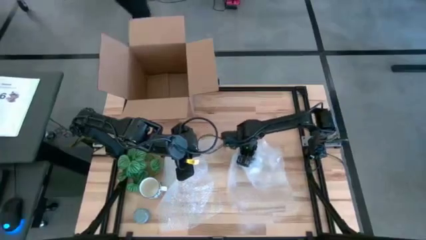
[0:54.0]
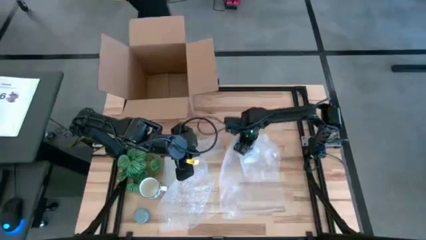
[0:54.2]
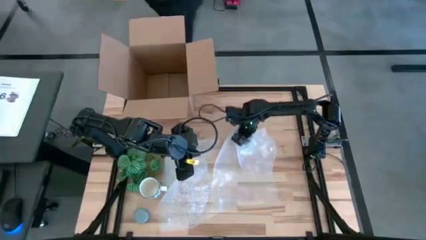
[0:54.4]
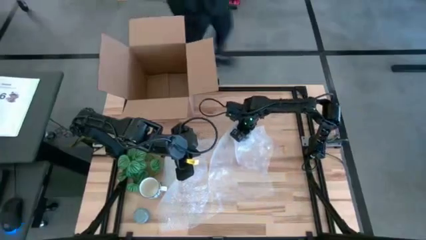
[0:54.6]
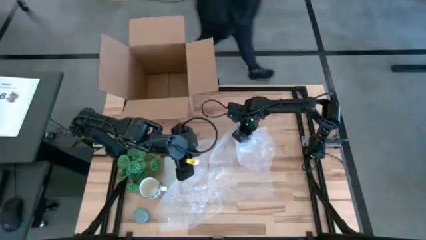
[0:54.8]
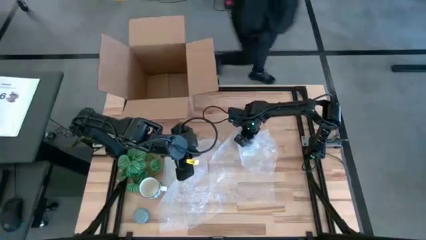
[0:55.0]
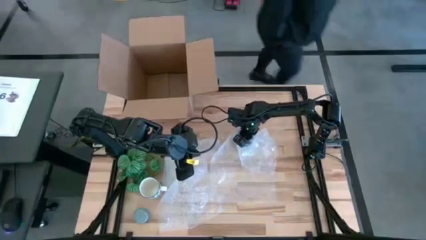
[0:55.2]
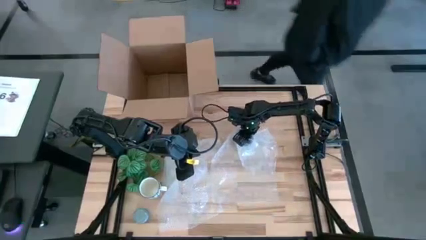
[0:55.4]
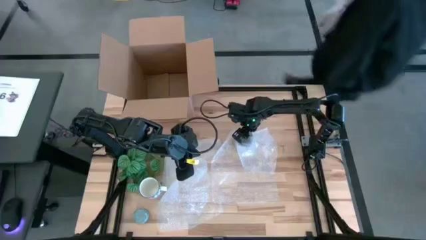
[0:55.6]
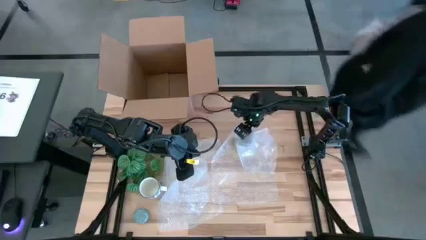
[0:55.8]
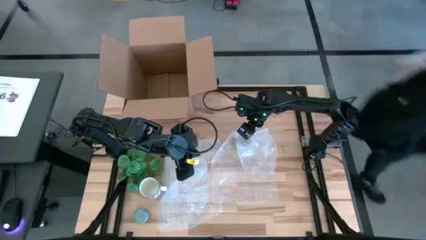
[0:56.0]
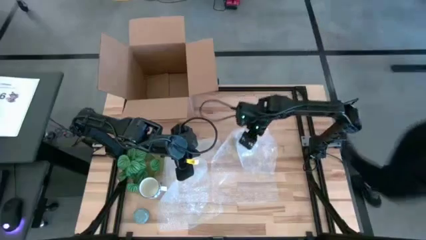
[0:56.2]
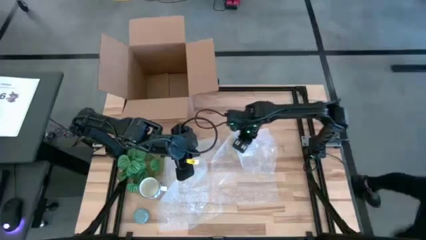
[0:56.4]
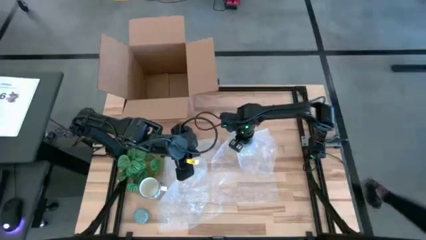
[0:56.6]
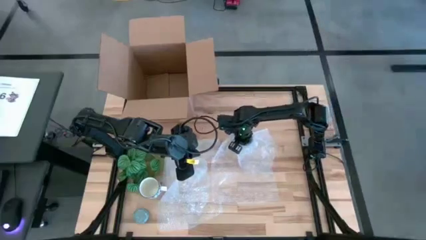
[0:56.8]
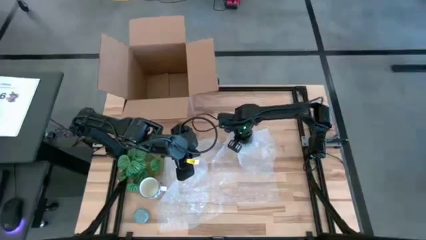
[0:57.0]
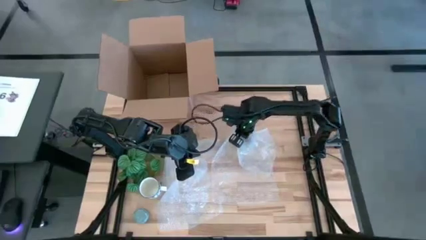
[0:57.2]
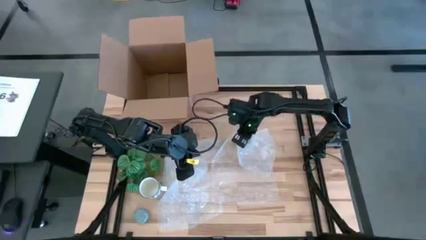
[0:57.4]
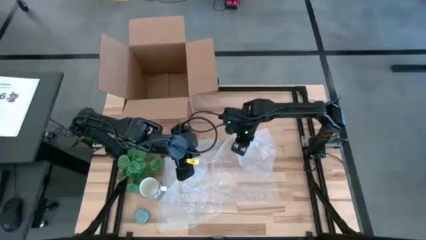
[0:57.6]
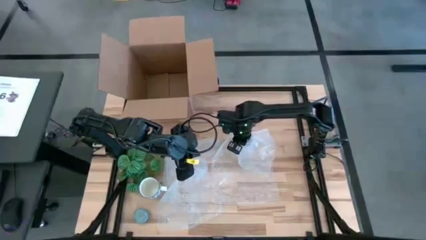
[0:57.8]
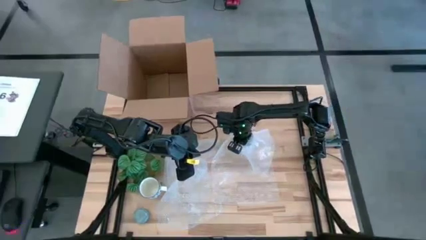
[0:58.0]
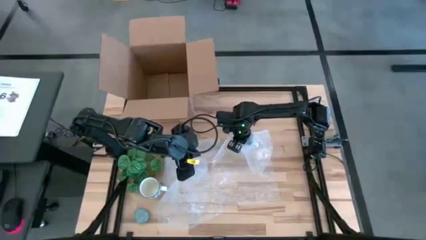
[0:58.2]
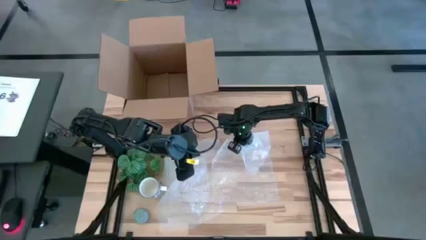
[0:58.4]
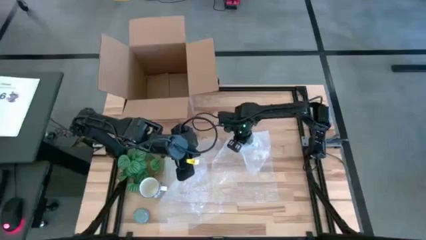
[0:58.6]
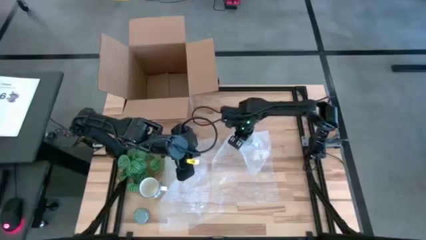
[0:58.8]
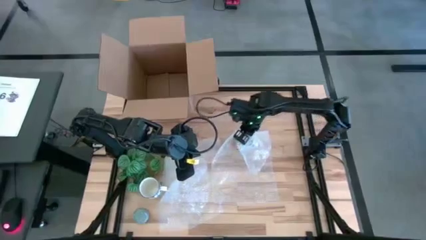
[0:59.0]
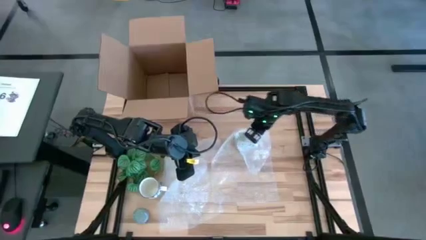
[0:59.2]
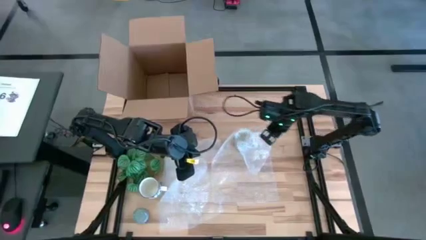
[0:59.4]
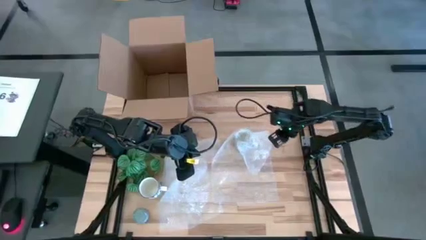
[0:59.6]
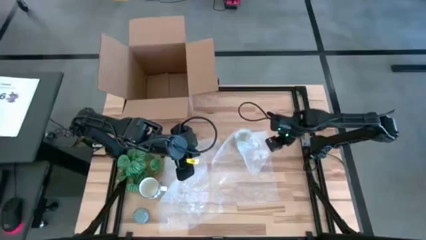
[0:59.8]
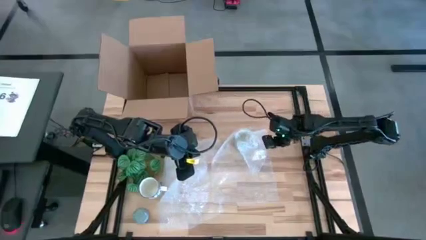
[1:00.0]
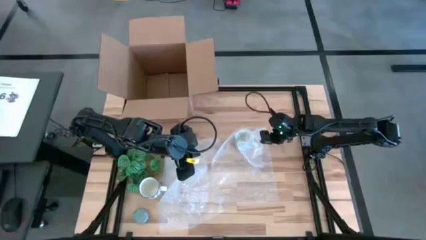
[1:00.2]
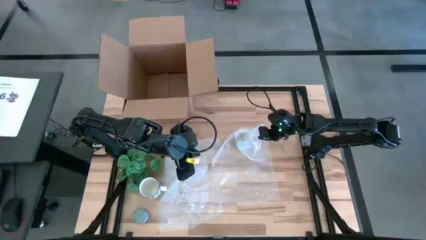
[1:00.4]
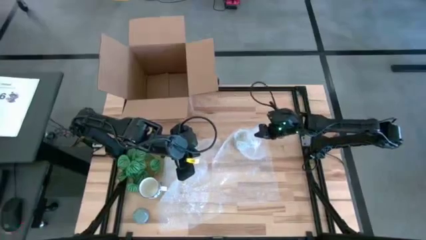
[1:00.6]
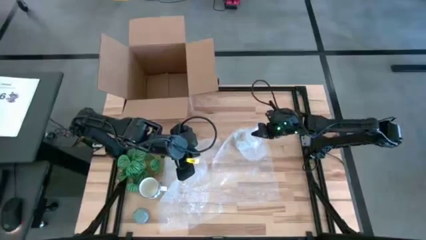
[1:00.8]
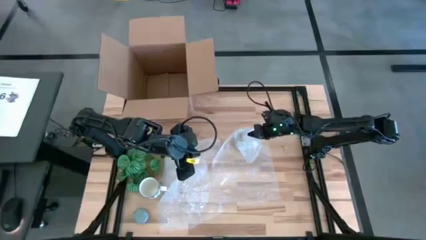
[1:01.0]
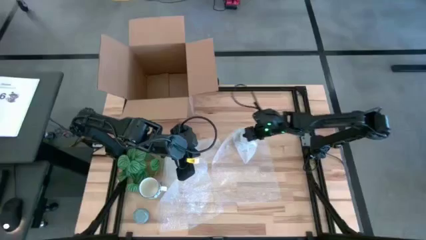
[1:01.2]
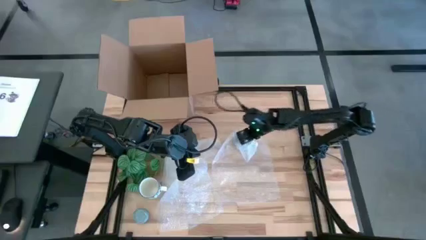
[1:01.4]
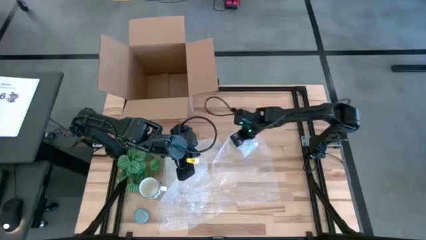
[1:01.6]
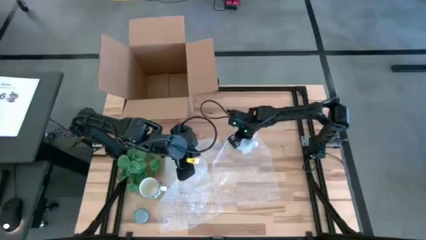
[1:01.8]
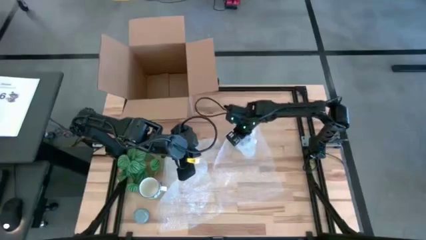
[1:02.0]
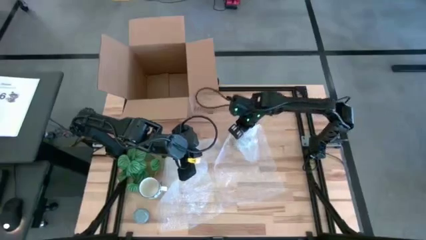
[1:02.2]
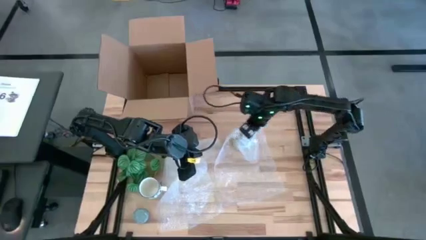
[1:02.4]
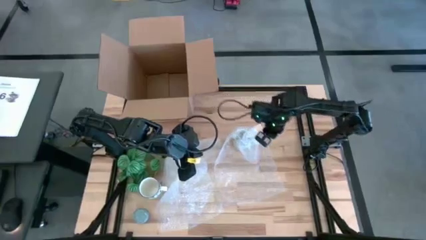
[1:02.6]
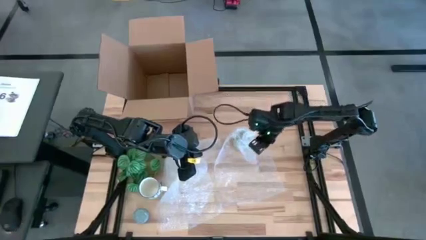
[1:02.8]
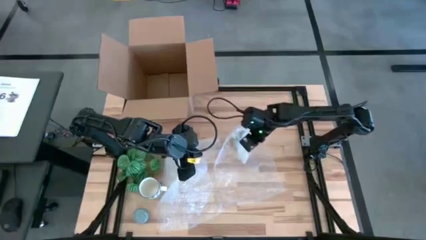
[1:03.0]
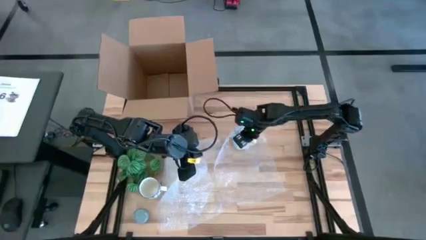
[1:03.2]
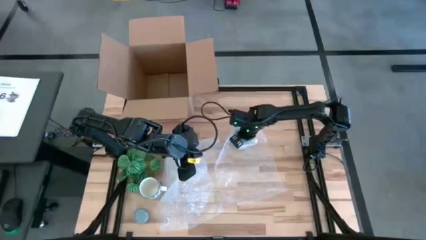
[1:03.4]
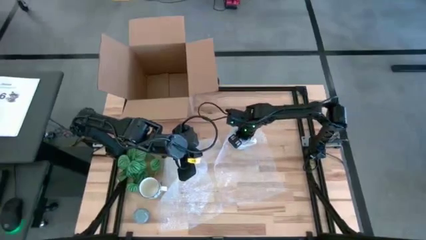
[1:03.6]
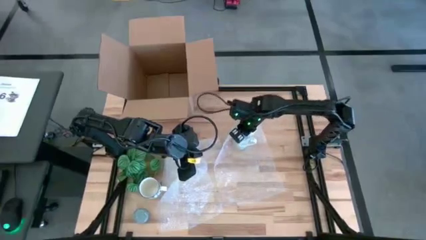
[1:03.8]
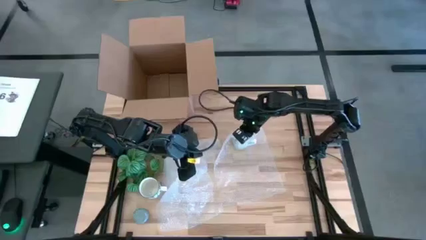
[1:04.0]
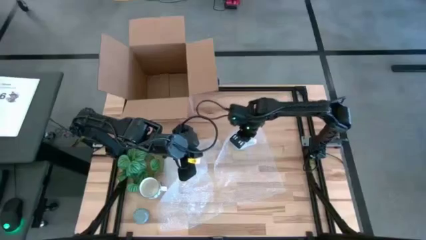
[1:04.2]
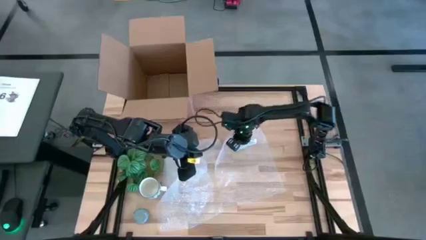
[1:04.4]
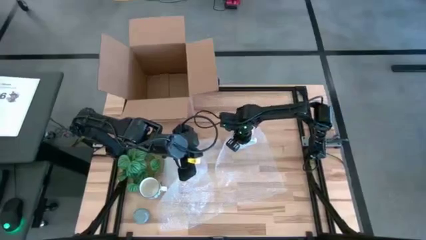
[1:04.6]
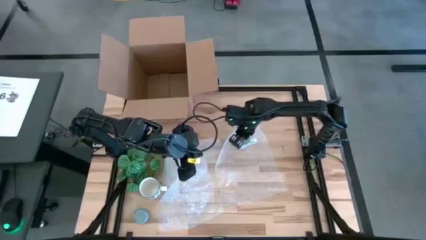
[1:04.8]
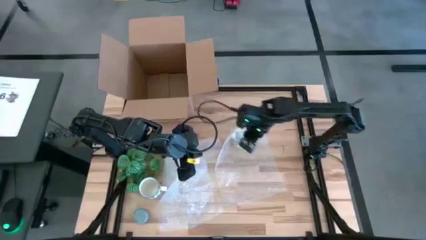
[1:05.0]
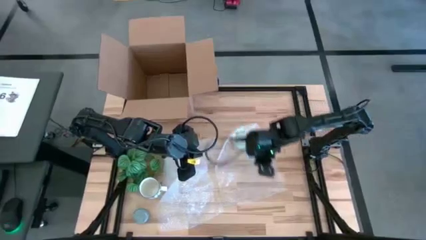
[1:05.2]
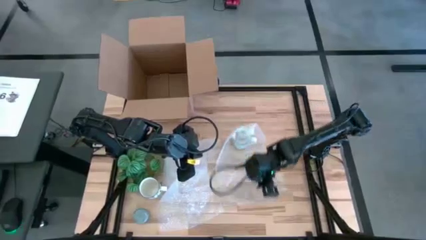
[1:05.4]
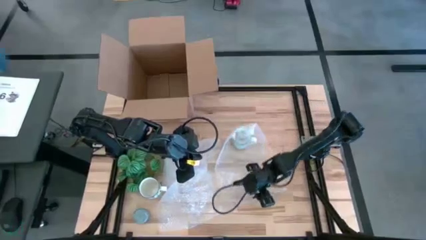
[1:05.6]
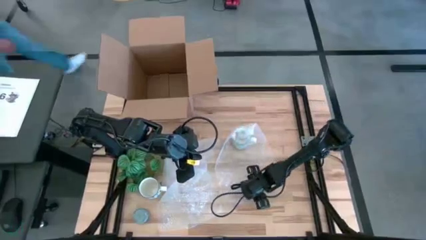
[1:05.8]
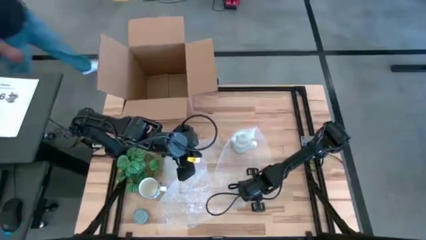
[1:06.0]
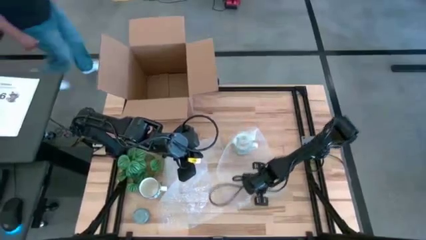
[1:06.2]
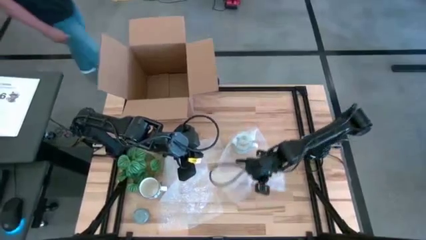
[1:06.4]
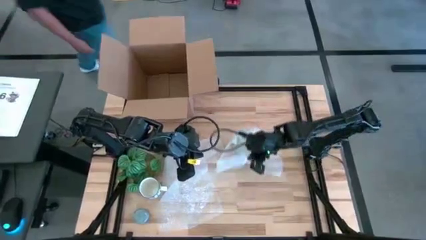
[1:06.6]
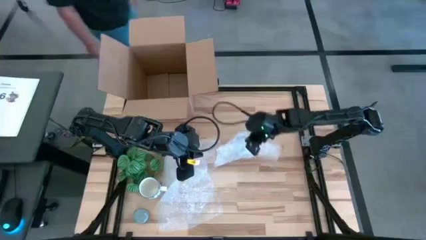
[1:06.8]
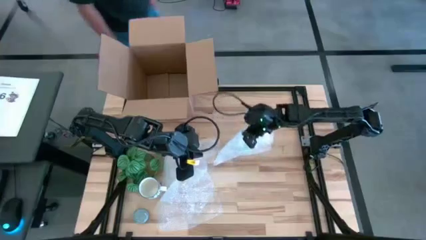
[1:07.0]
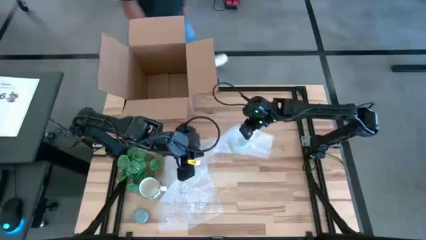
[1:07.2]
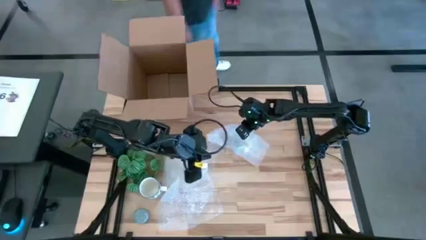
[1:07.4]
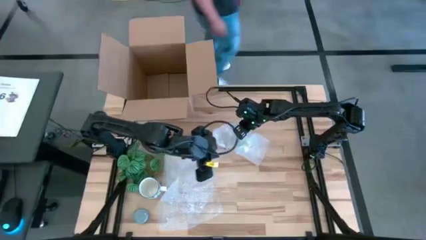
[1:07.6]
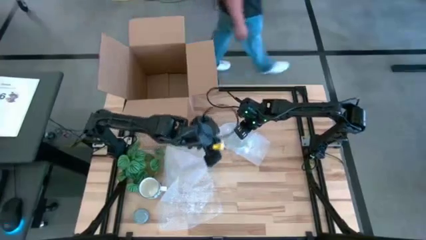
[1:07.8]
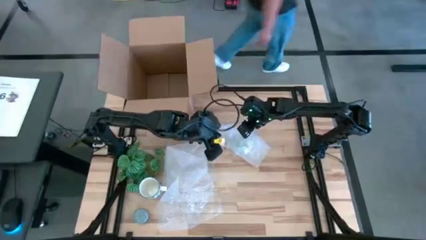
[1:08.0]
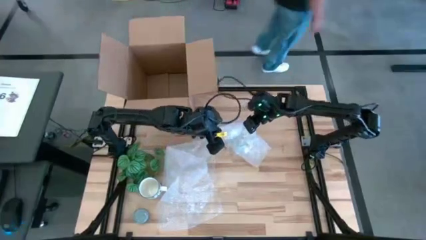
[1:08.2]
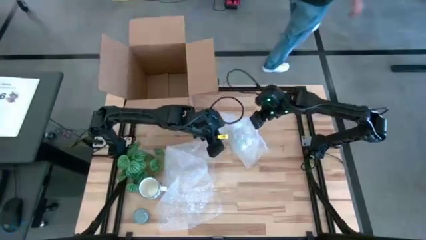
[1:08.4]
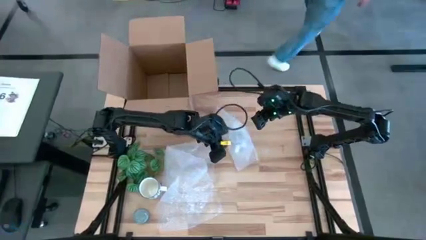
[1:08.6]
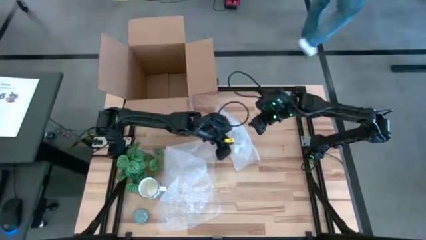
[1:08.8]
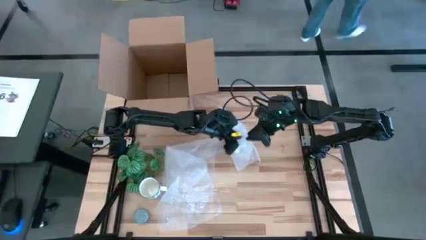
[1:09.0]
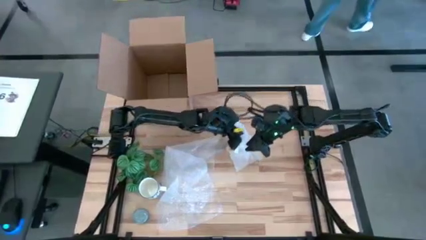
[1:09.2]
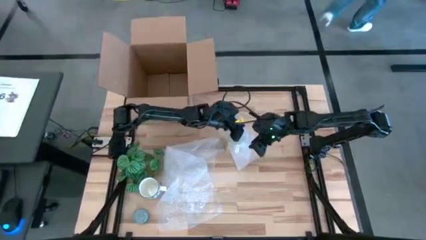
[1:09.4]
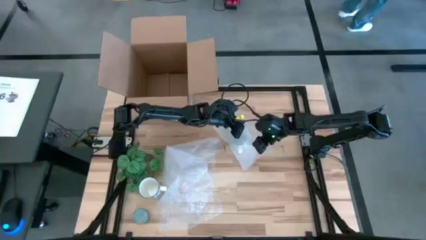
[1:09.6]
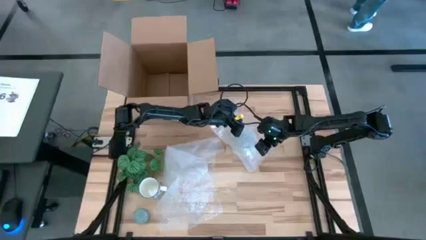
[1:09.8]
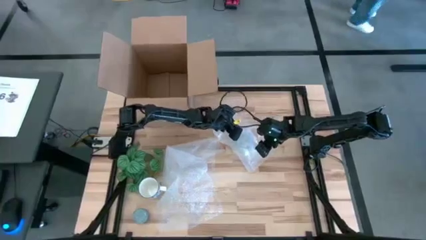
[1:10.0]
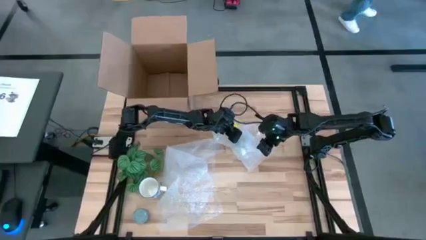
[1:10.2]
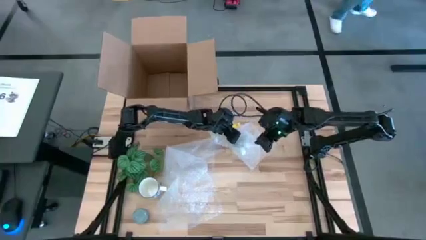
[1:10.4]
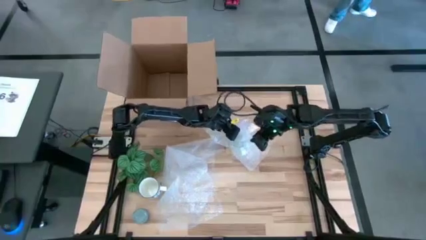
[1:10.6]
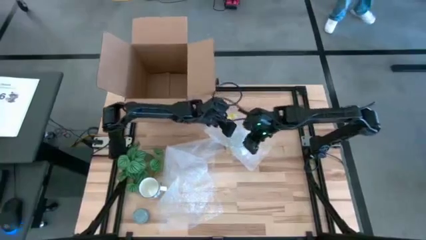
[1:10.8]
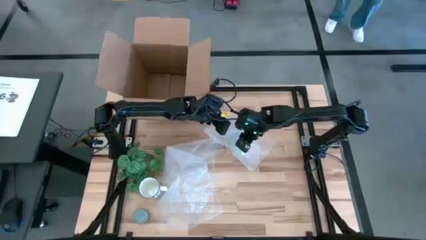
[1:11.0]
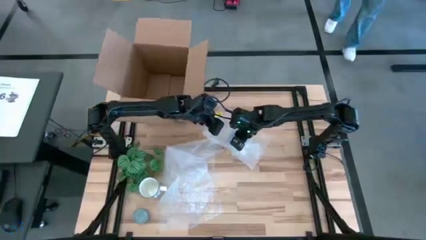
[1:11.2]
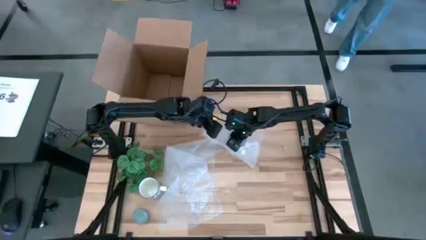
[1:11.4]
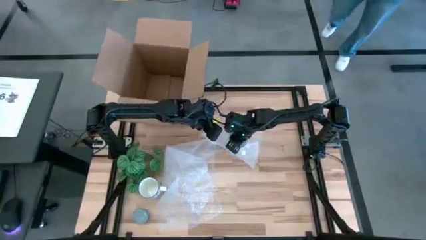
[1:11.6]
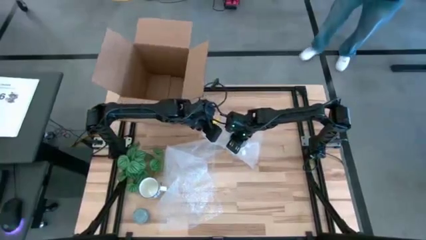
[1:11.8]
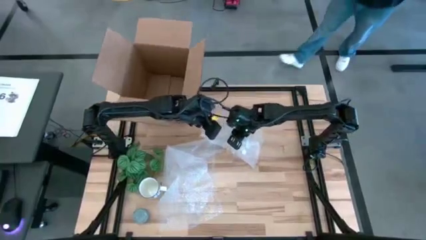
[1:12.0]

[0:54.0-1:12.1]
Task: wrap mug
Wrap the green mug with bubble wrap
